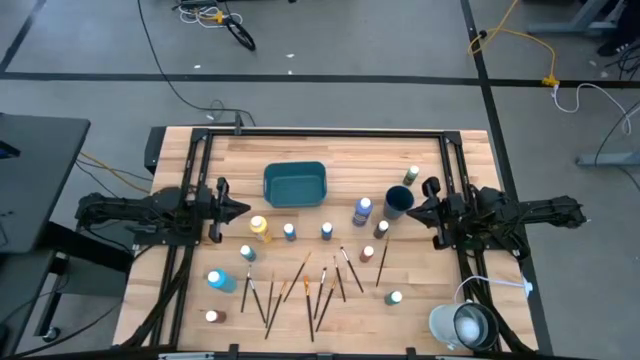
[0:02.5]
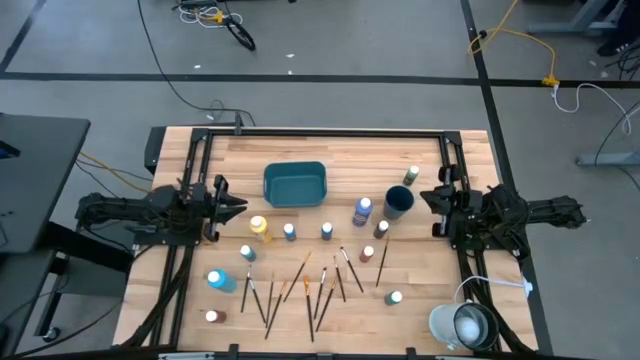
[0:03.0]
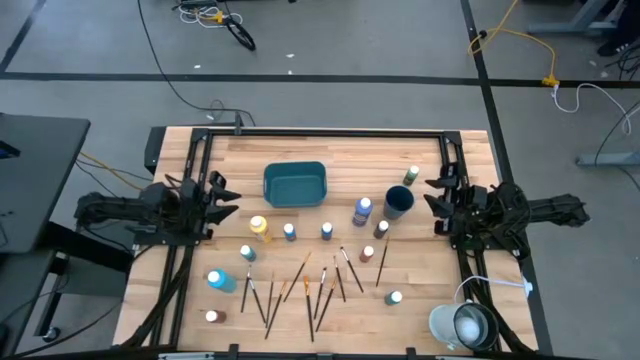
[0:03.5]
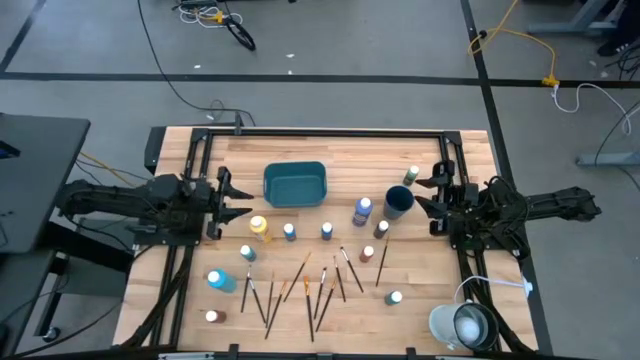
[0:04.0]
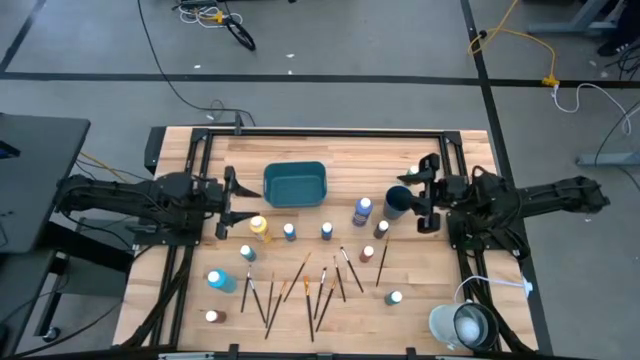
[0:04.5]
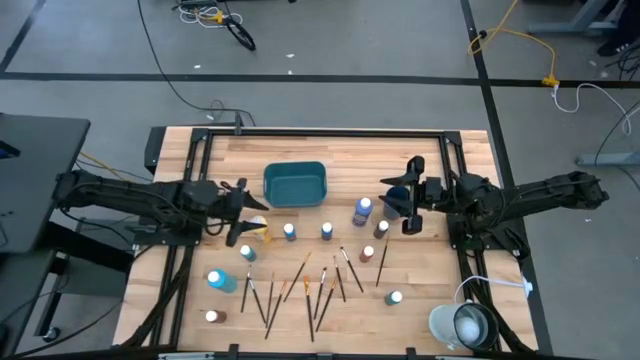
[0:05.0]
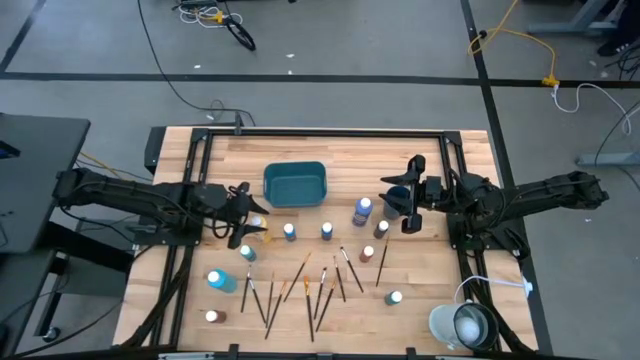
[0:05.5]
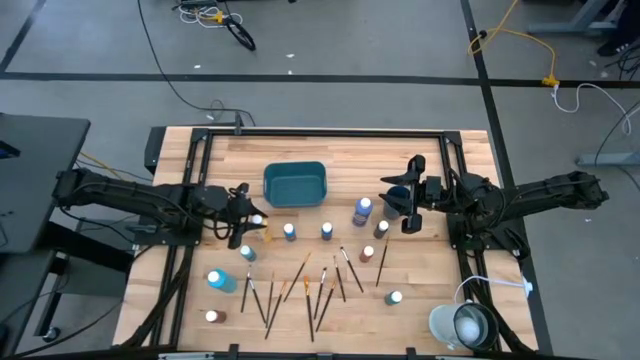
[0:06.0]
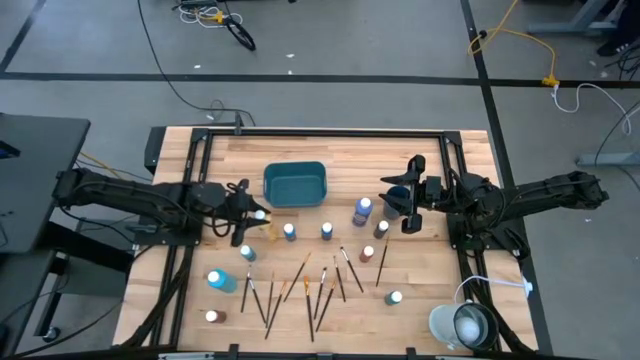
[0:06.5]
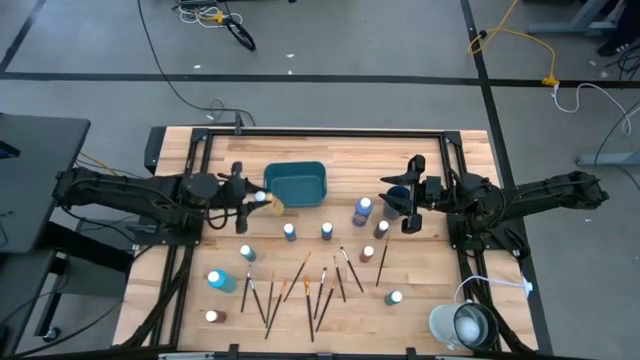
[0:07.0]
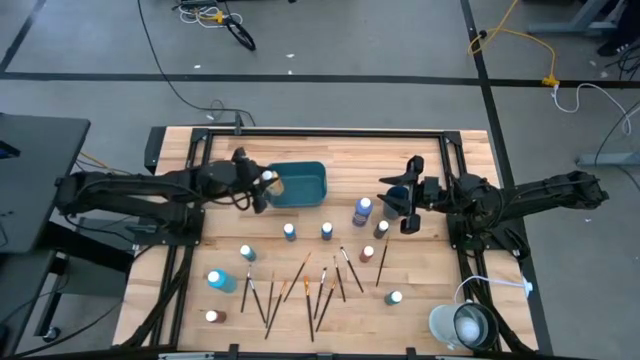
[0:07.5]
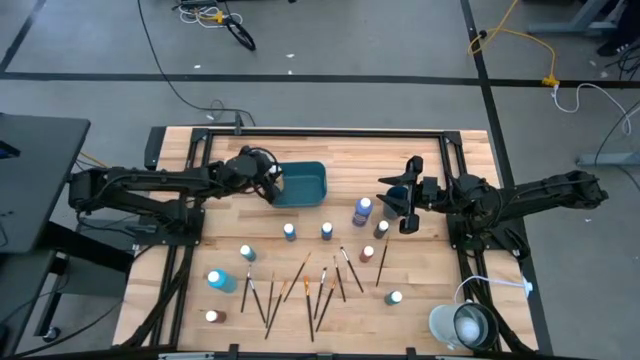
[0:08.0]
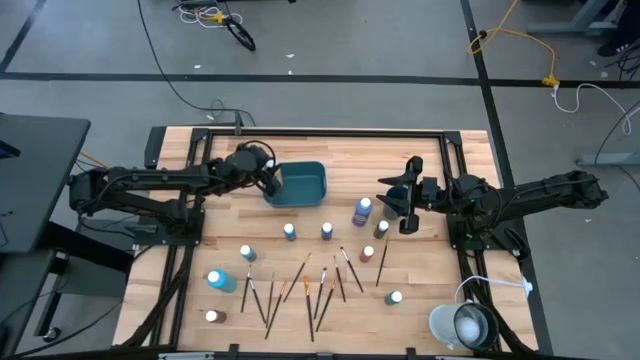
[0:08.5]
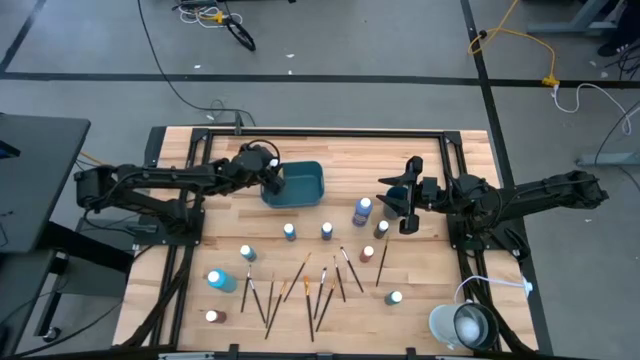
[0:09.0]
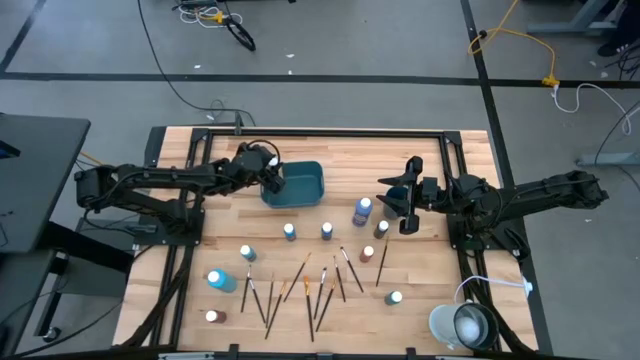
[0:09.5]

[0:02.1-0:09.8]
Task: Pick & Place Paint Supplies
Put the yellow paint bottle into the blue bin

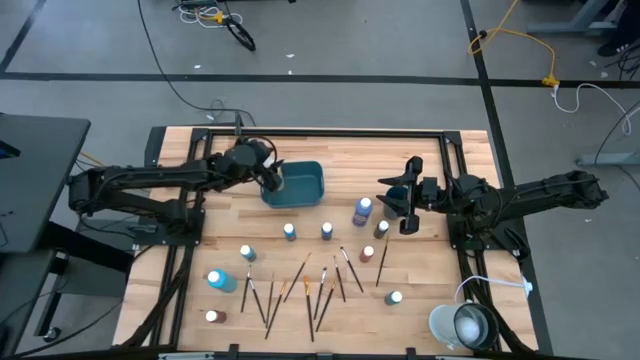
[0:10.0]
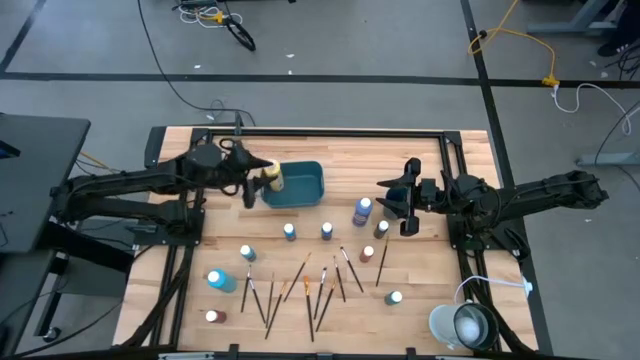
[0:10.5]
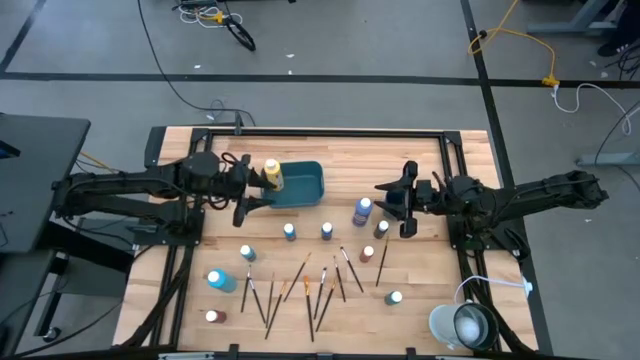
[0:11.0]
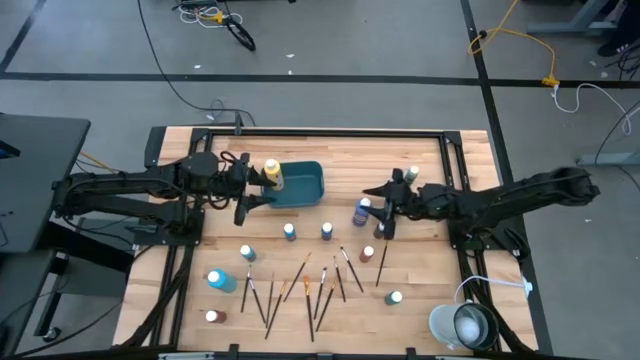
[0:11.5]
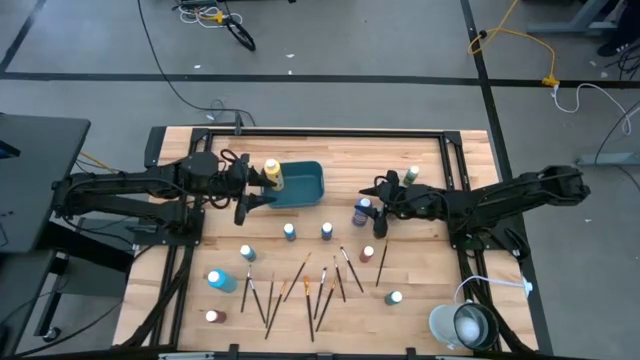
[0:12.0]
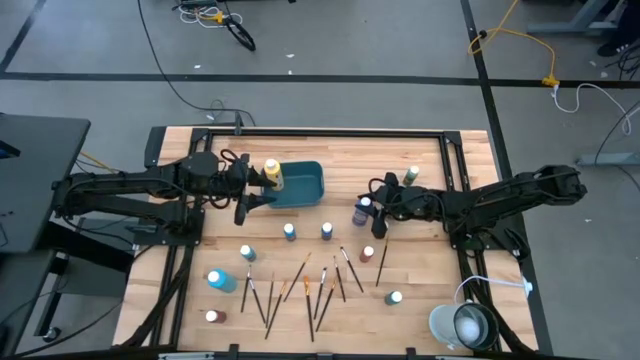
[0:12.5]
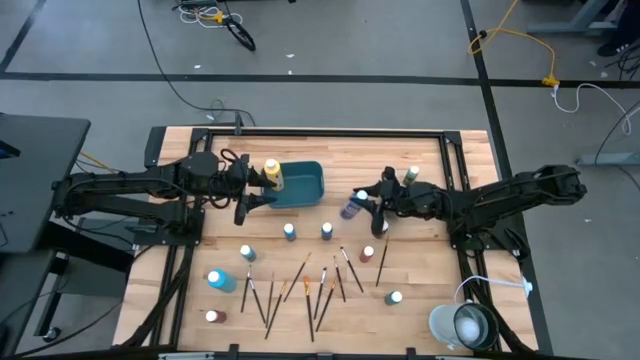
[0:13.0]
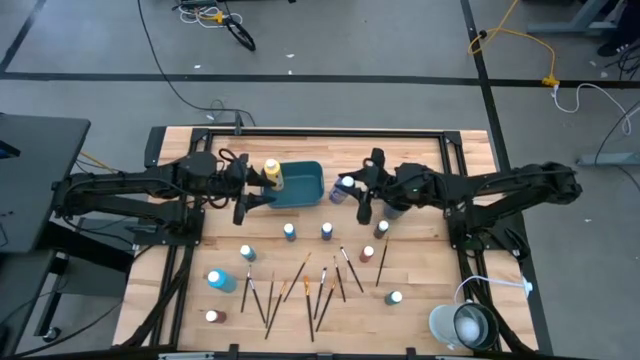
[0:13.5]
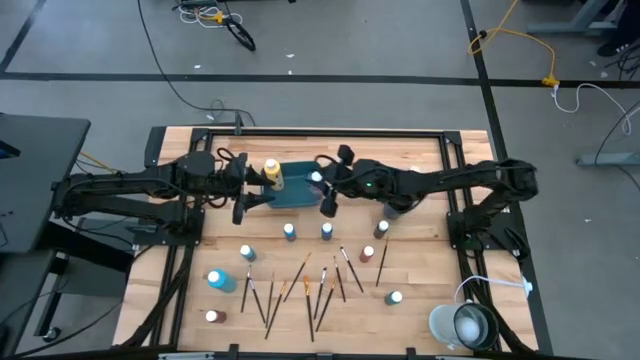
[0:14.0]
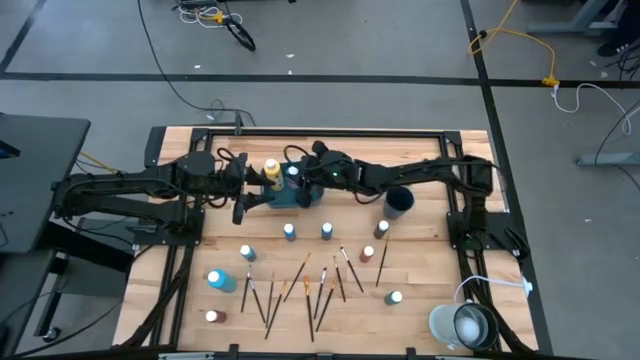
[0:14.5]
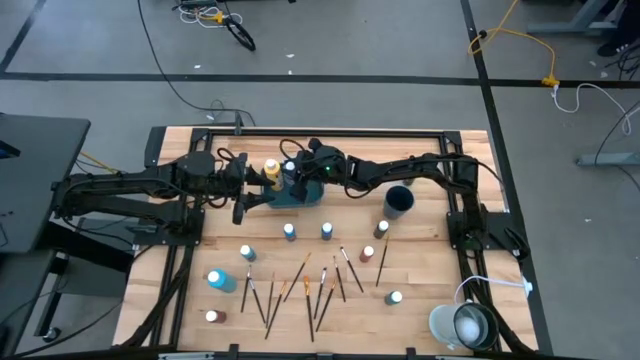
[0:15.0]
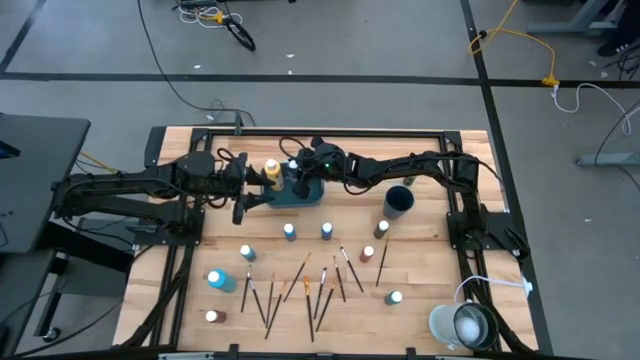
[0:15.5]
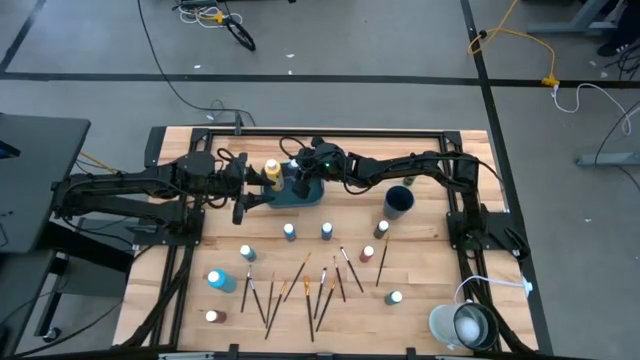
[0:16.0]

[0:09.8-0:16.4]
Put the purple paint bottle into the blue bin

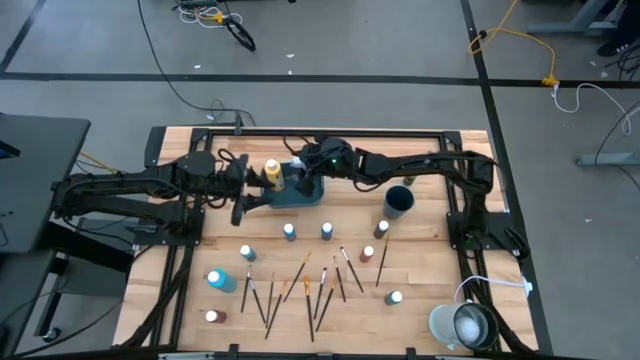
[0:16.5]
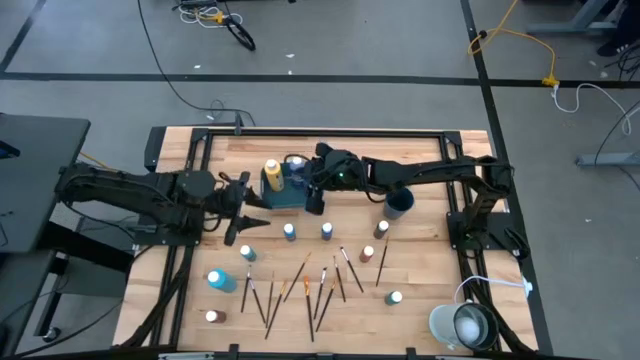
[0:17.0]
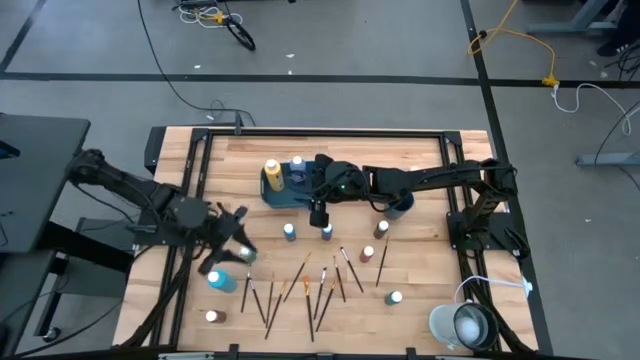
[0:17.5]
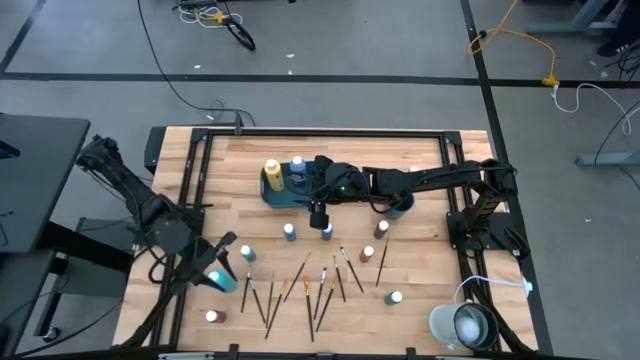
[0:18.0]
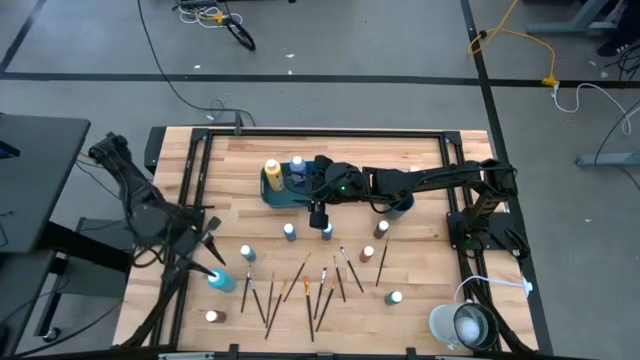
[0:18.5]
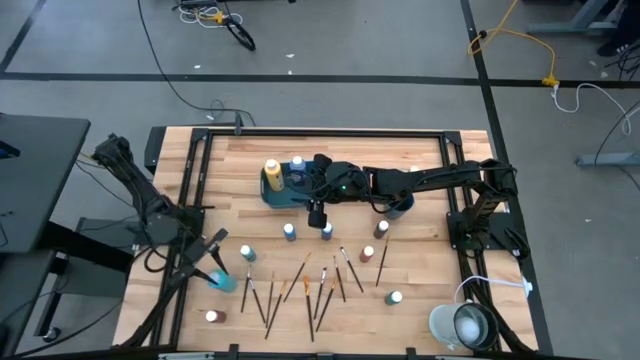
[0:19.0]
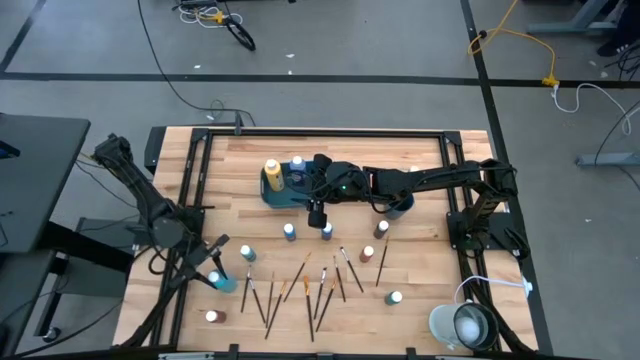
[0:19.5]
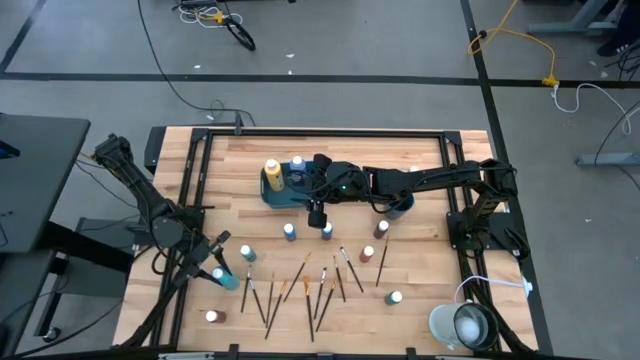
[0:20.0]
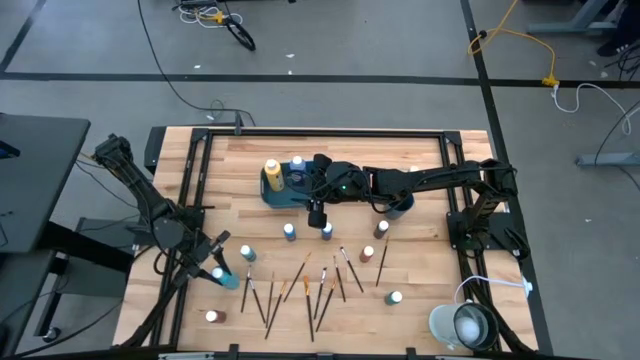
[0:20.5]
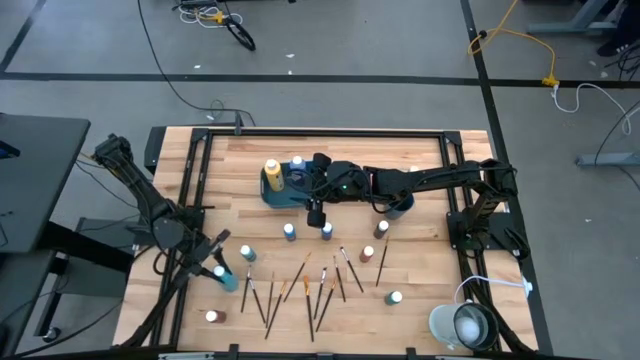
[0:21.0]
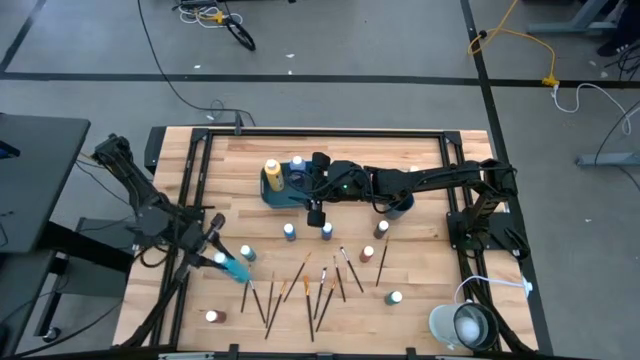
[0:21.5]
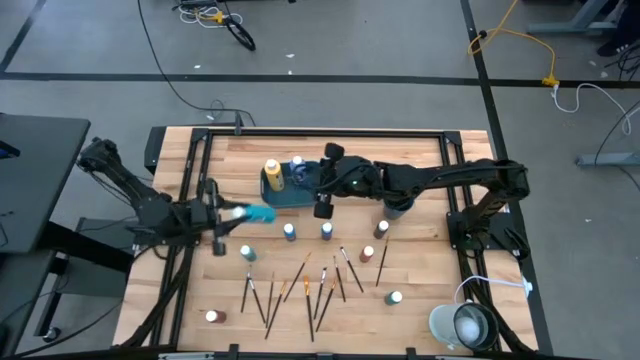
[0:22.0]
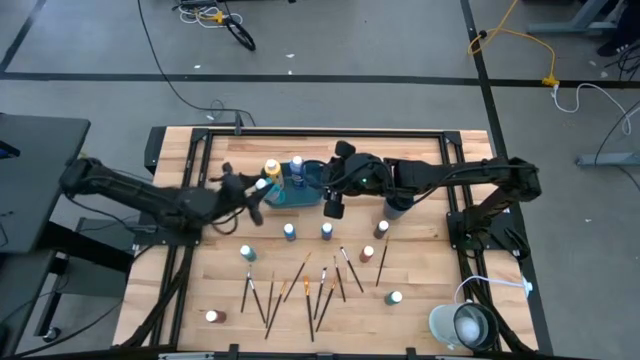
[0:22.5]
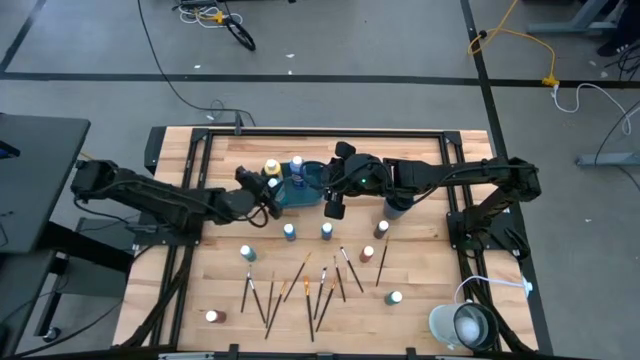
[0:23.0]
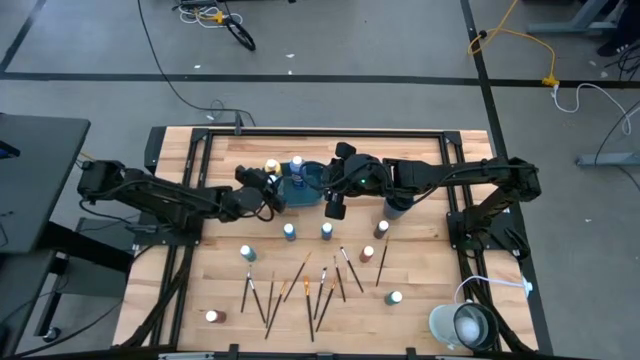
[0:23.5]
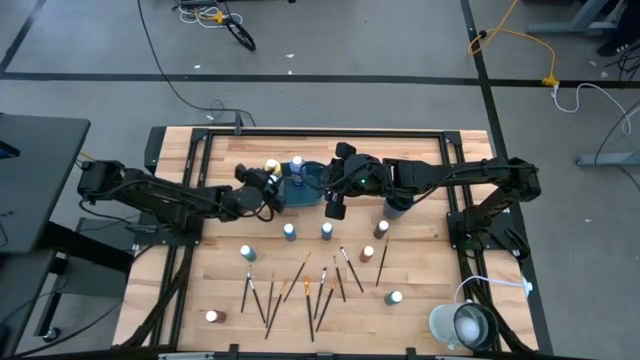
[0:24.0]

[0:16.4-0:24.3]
Put the big light blue paint bottle into the blue bin
